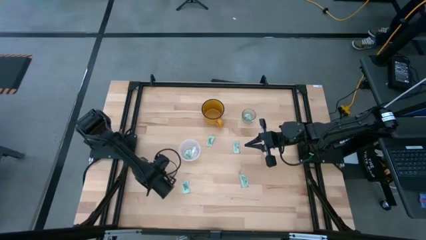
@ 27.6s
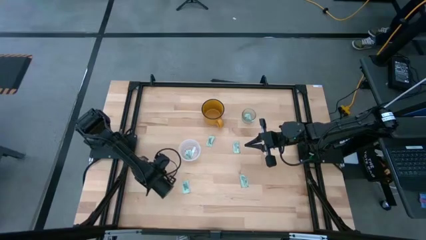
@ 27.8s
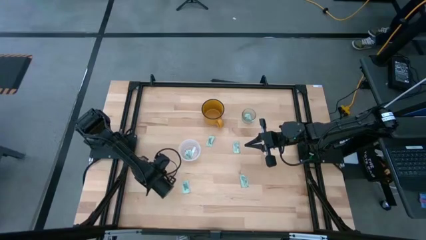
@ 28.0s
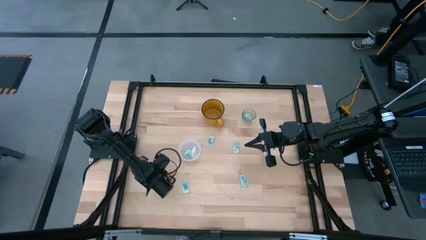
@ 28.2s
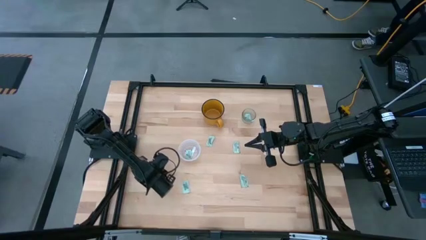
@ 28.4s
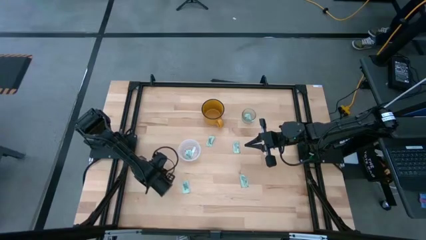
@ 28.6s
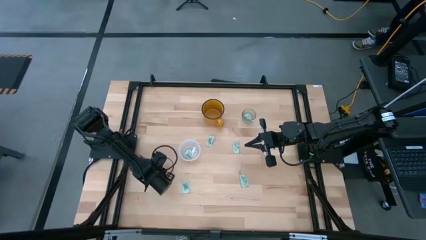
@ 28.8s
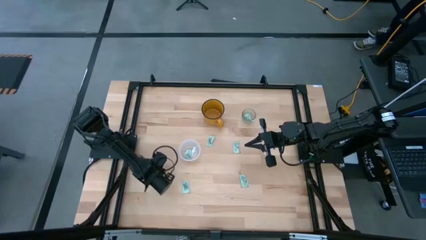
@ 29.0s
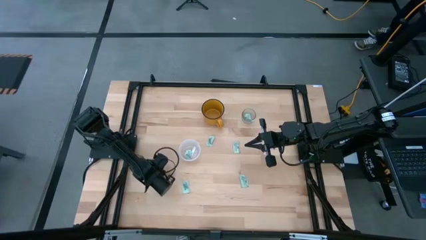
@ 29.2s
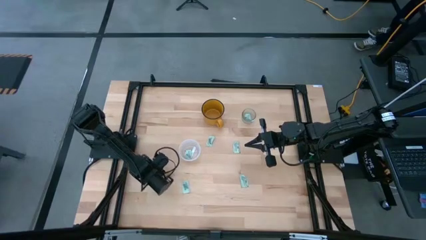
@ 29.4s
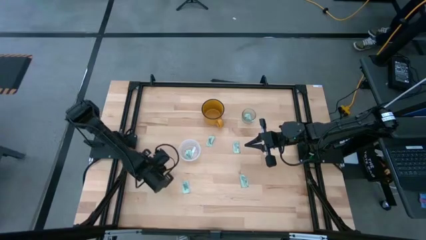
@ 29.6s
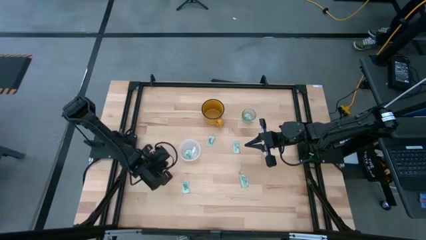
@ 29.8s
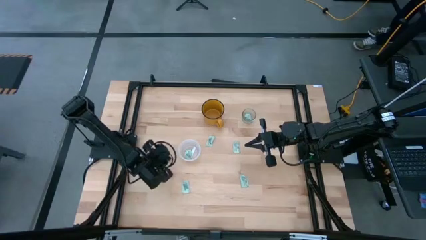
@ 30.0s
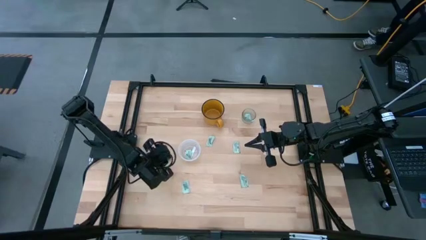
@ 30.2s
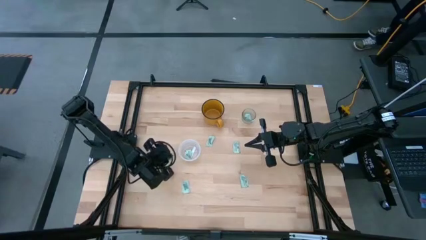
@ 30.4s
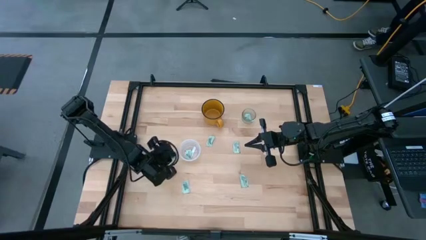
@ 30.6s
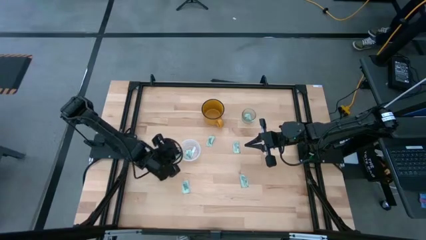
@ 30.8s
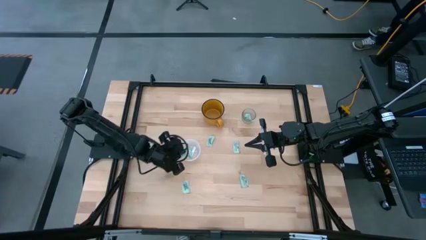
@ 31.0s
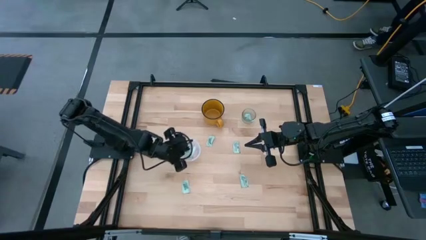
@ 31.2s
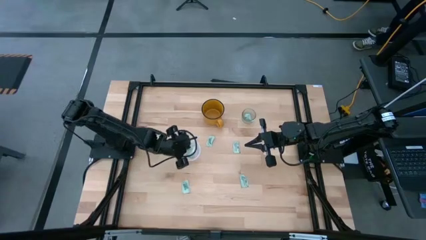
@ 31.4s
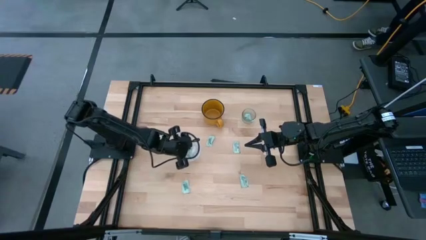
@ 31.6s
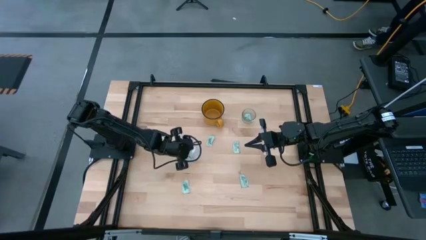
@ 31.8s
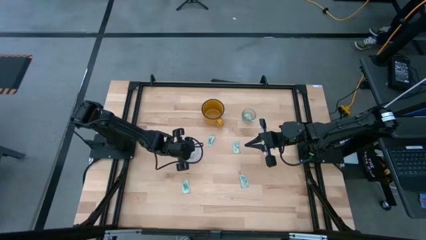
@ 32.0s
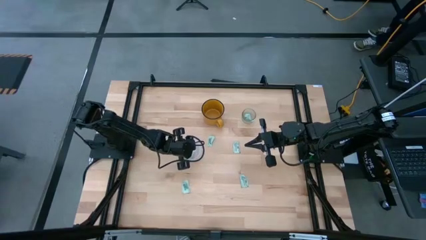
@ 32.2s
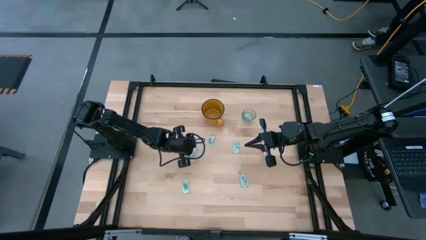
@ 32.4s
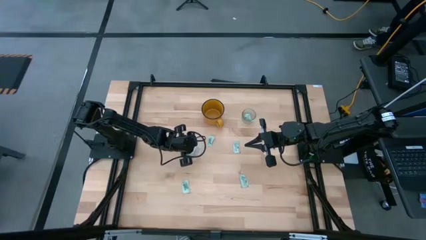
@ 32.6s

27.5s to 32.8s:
Task: Pick and place Stevia / Truvia into bins
Put the stevia packet into the transparent container

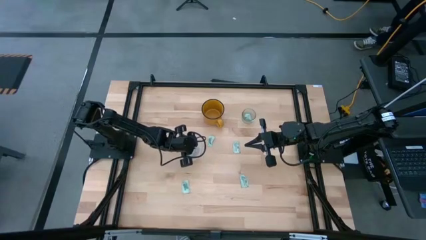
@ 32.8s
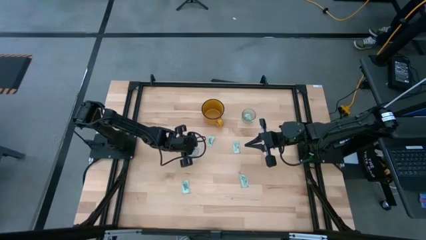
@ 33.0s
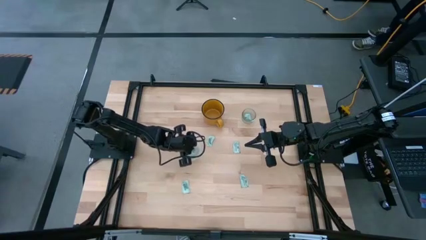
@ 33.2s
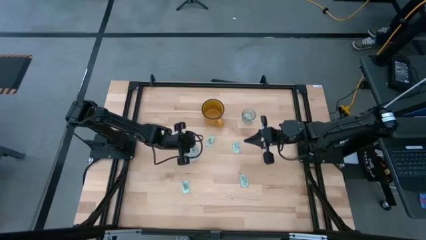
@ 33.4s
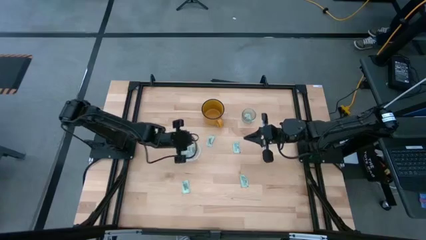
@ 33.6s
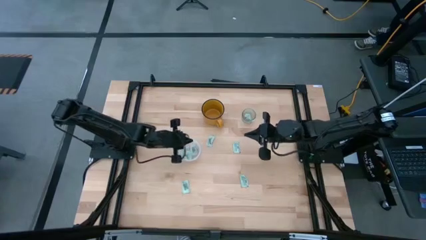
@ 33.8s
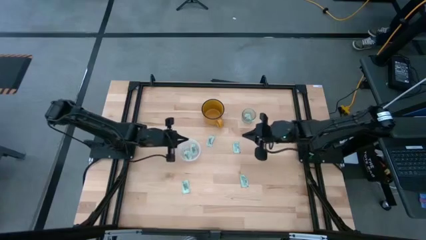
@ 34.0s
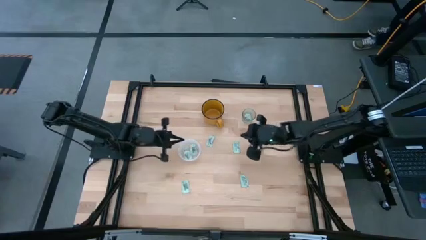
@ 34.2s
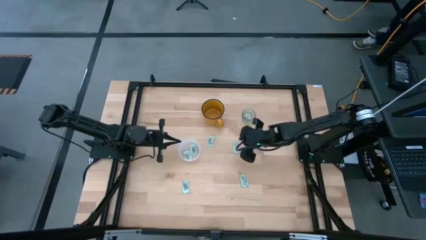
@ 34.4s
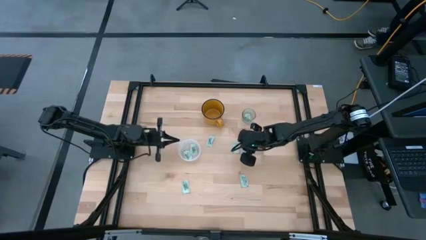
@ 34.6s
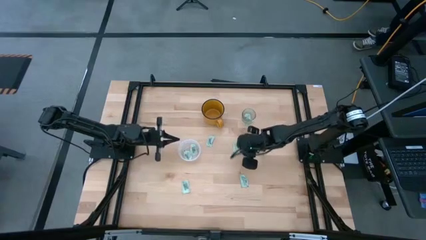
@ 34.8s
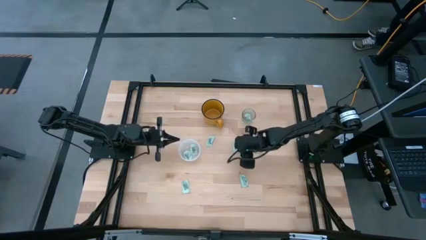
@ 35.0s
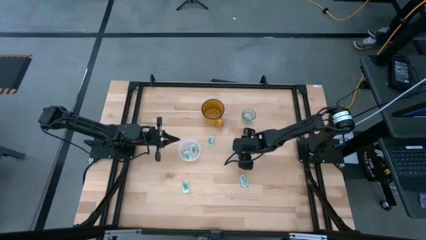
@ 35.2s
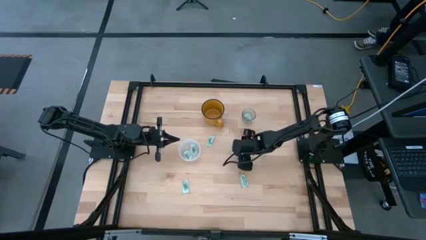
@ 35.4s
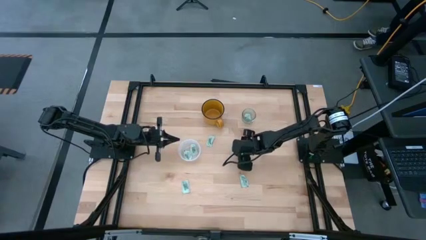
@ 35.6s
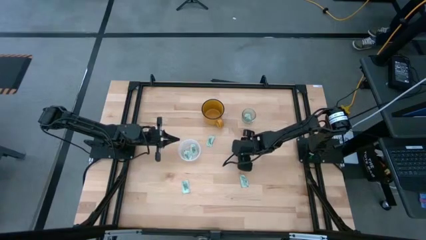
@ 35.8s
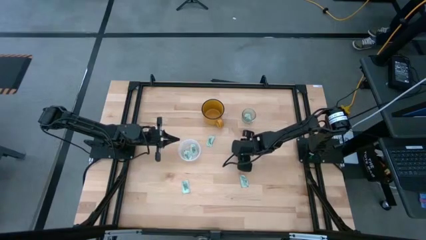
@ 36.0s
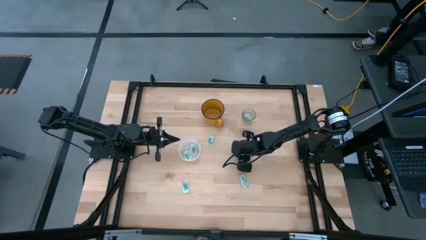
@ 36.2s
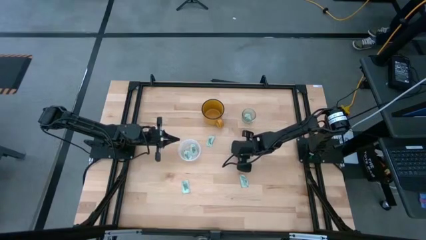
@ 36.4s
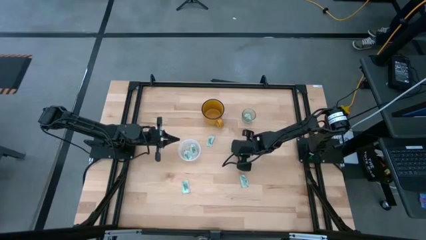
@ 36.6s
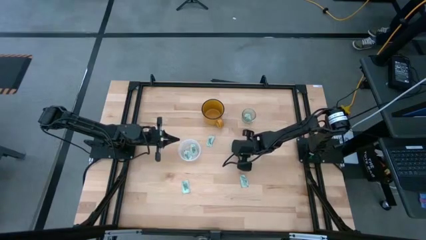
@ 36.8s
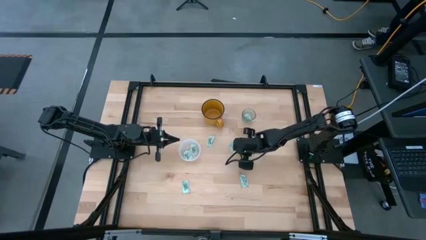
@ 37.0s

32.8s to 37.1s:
Put the stevia packet into the transparent container

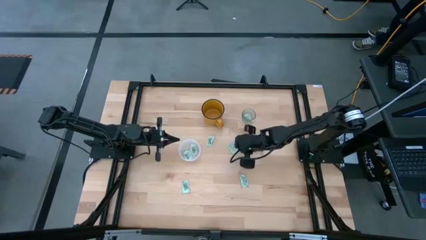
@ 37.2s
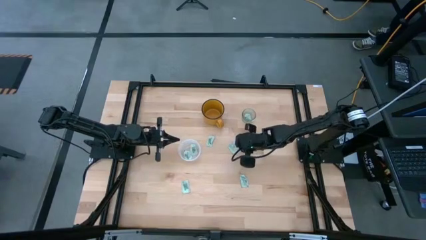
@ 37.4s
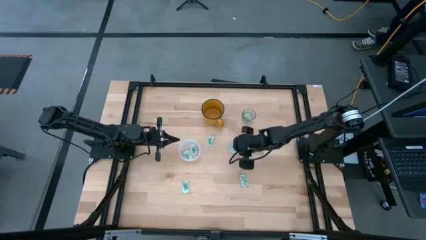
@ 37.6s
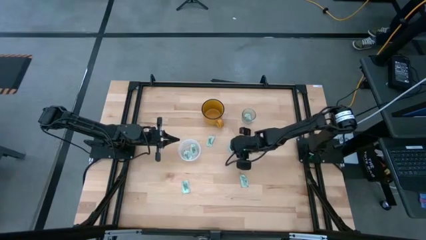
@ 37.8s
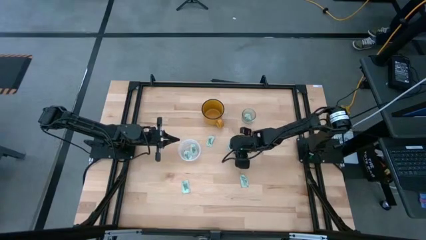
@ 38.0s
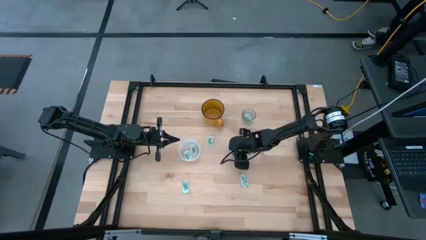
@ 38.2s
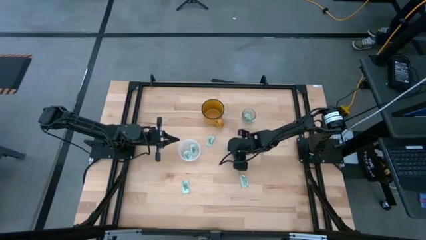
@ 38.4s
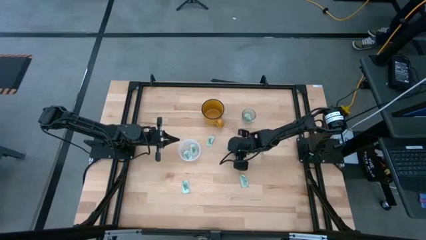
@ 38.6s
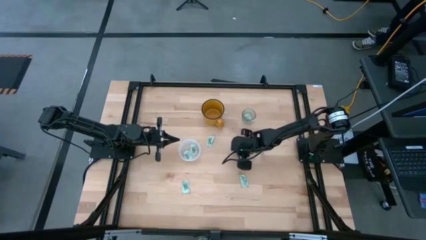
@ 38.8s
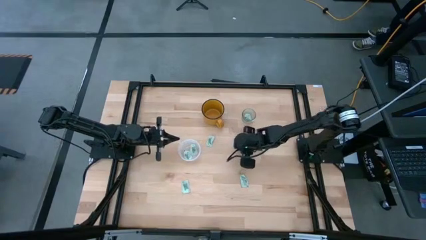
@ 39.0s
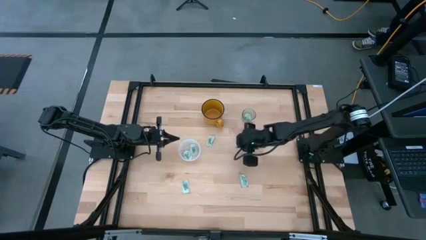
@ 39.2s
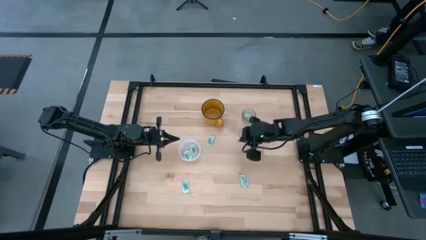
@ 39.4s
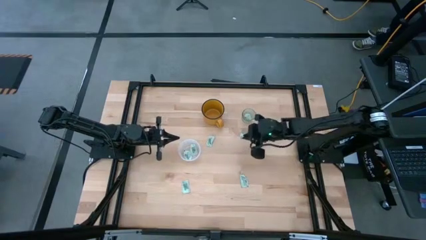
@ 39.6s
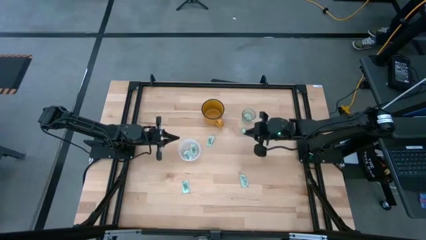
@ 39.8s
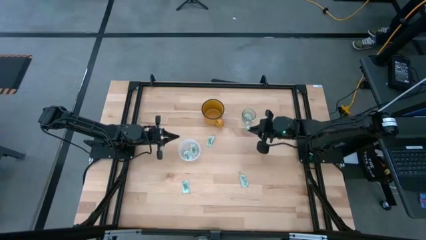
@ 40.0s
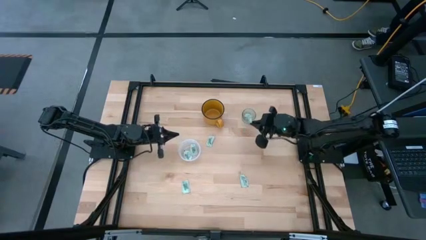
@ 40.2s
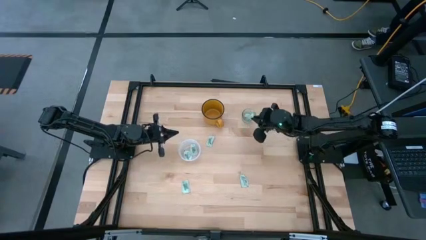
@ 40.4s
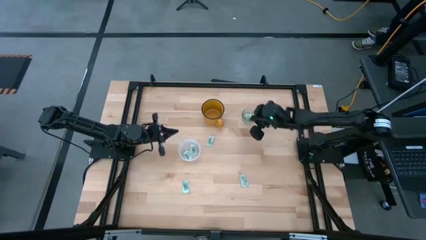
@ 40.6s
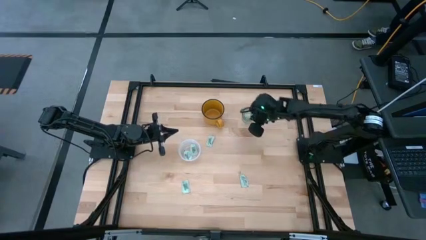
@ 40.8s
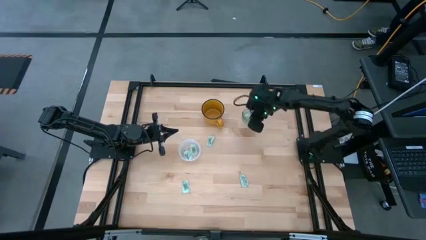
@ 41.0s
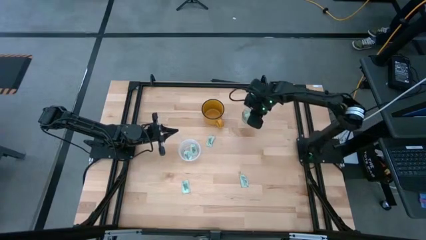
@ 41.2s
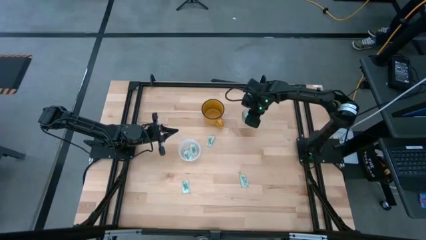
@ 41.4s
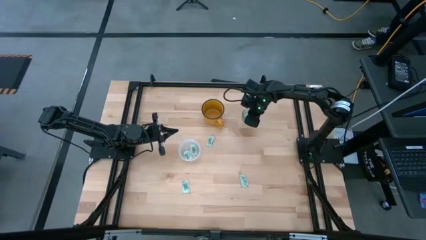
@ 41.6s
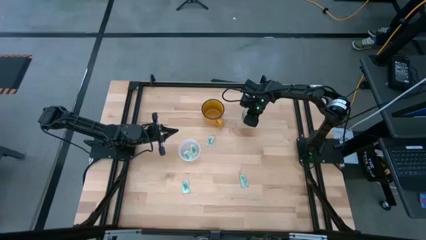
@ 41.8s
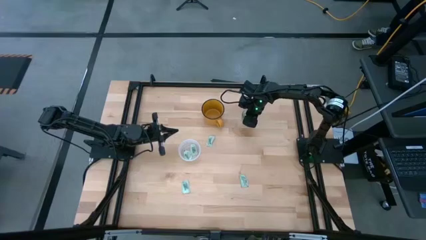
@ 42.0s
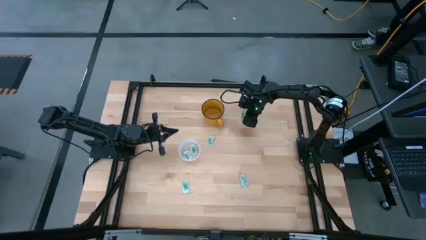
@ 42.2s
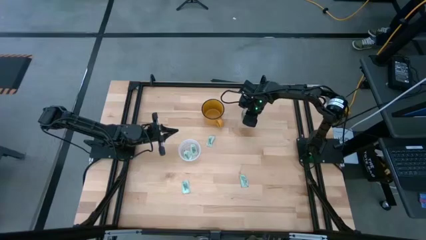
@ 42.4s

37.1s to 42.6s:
Put the stevia packet into the transparent container

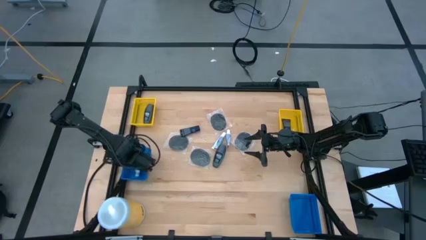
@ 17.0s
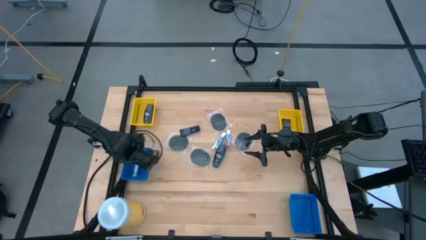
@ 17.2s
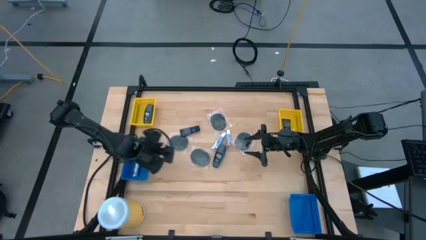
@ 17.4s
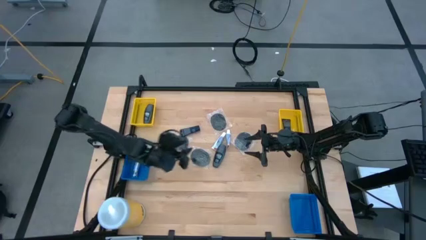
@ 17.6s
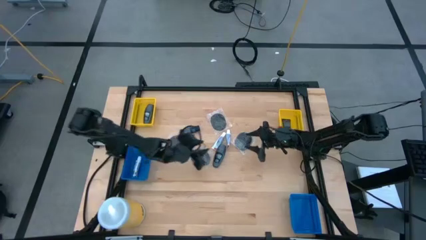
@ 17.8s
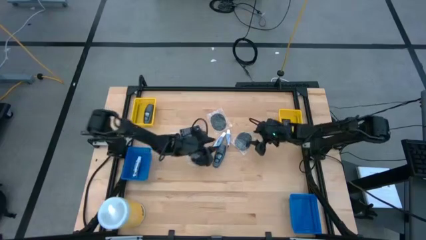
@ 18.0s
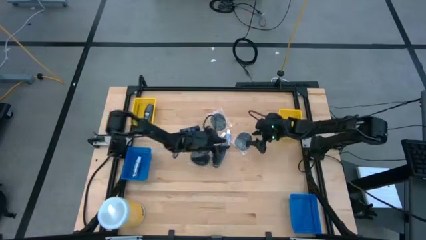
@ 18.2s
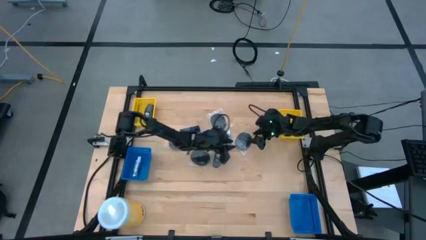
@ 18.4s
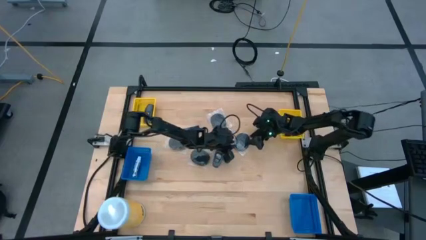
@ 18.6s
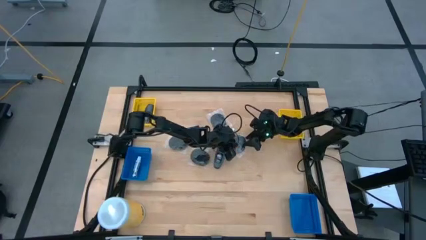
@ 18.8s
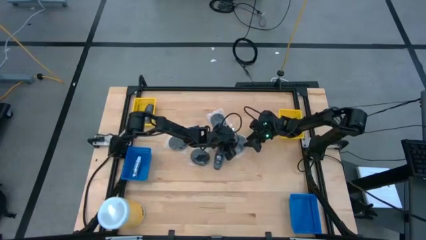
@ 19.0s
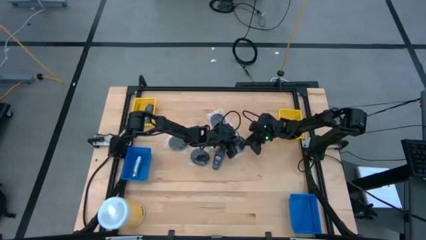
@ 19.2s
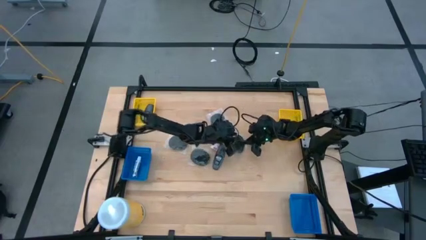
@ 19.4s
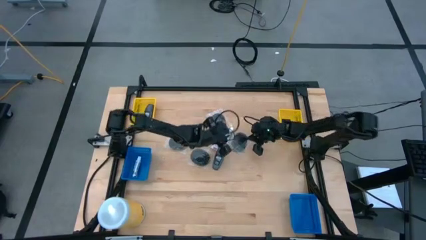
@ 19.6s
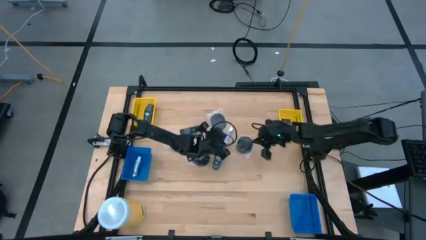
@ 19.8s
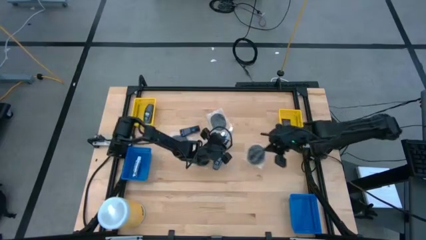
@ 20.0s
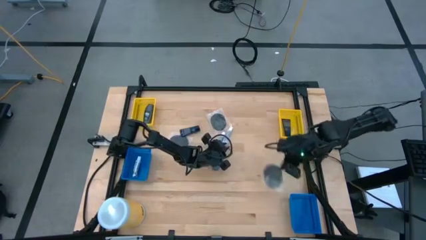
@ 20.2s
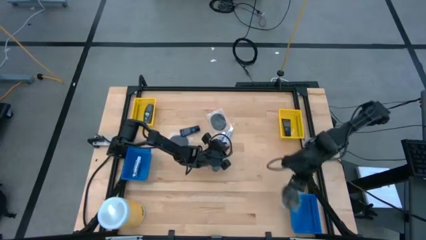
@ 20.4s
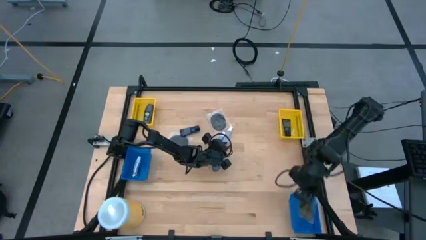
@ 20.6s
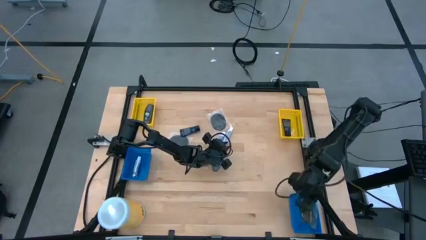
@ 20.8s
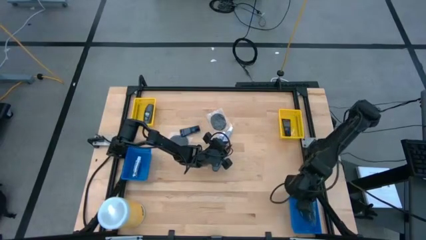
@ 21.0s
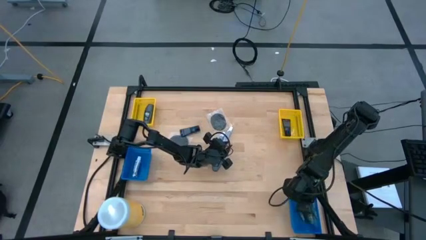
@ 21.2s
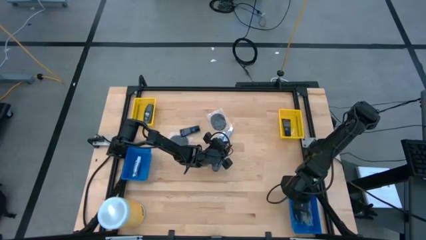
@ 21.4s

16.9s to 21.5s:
Task: Pick & Place Travel size toiletries
Put the black hairbrush into the right blue basket
